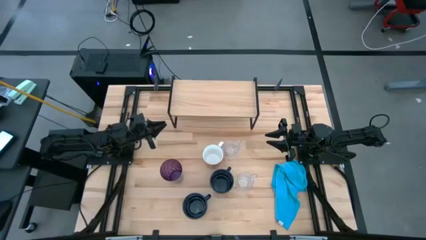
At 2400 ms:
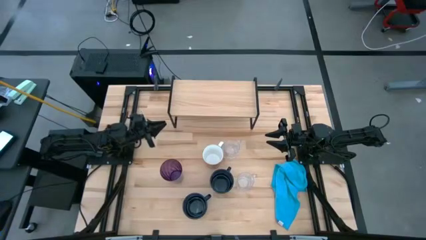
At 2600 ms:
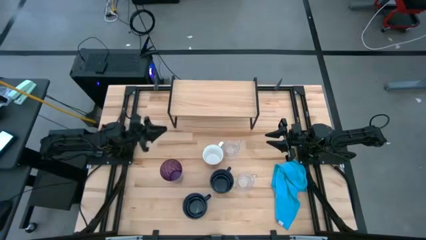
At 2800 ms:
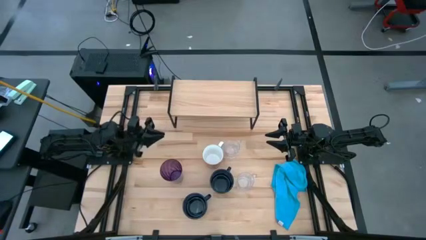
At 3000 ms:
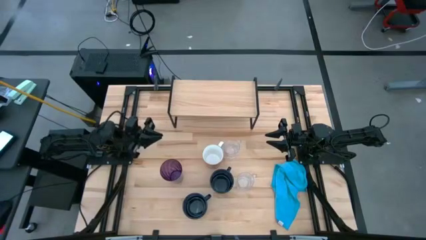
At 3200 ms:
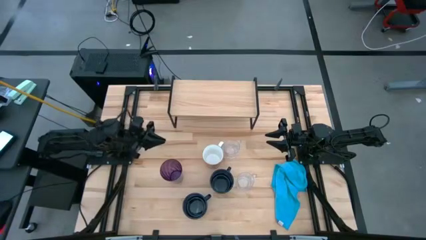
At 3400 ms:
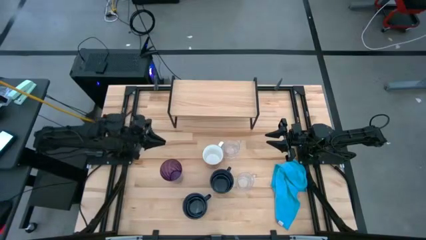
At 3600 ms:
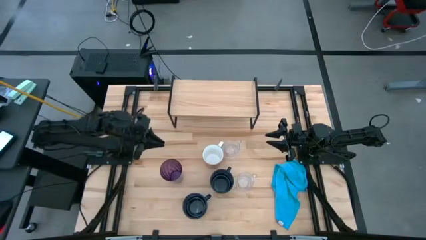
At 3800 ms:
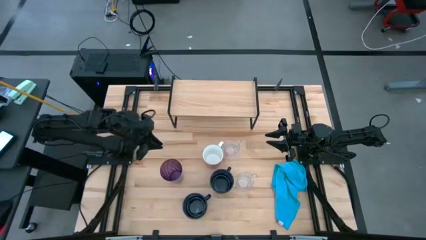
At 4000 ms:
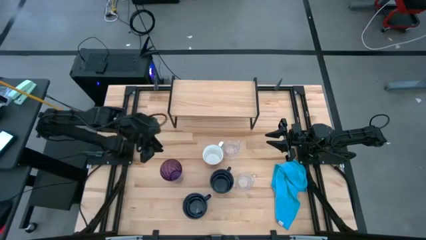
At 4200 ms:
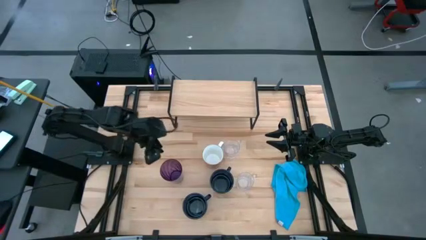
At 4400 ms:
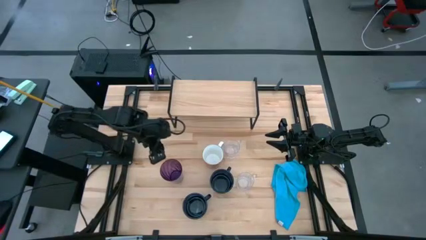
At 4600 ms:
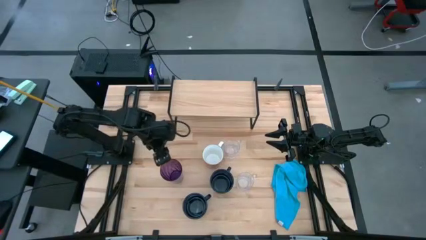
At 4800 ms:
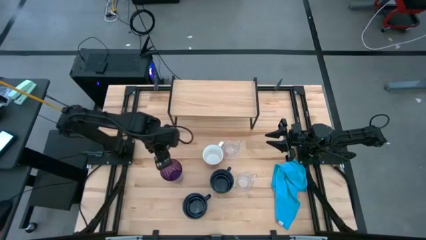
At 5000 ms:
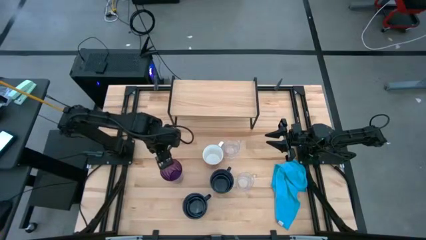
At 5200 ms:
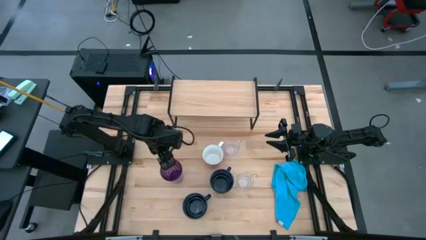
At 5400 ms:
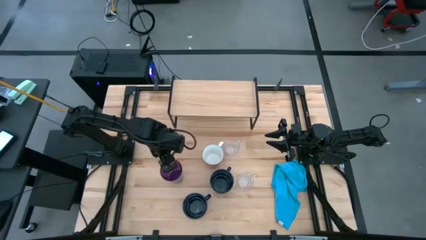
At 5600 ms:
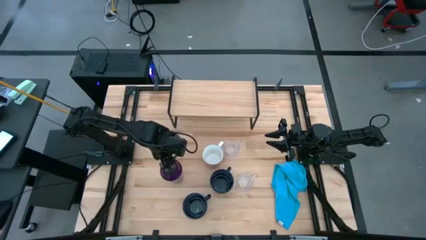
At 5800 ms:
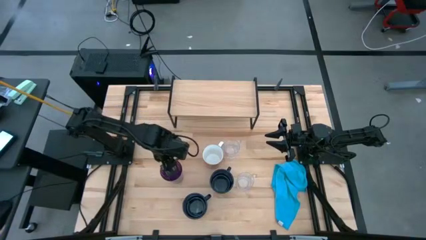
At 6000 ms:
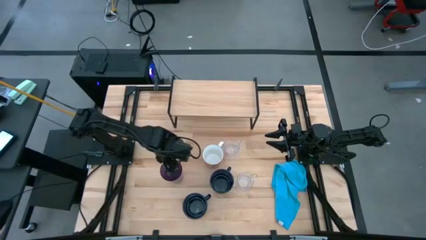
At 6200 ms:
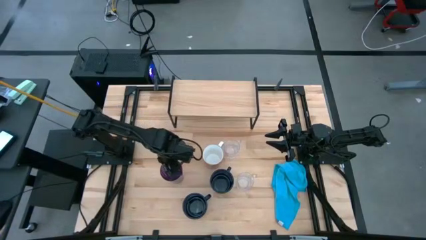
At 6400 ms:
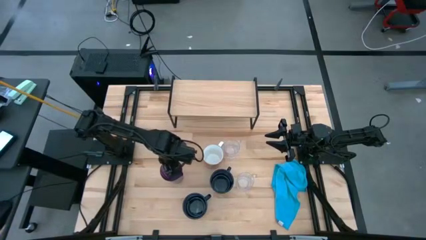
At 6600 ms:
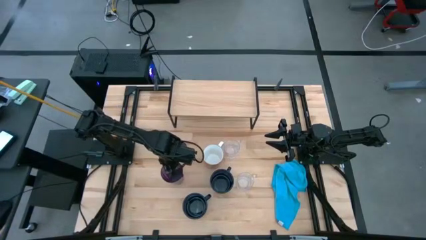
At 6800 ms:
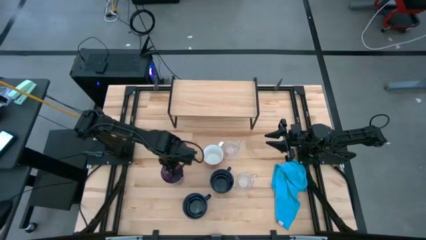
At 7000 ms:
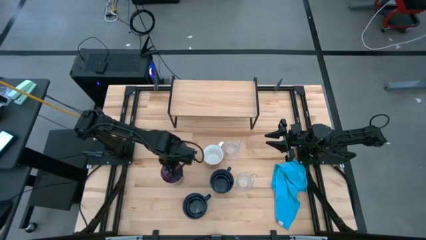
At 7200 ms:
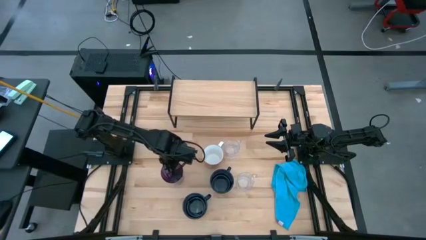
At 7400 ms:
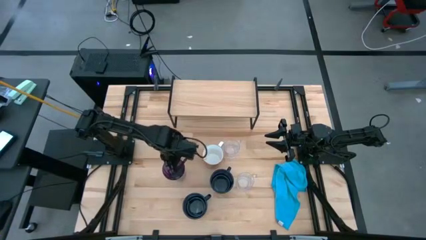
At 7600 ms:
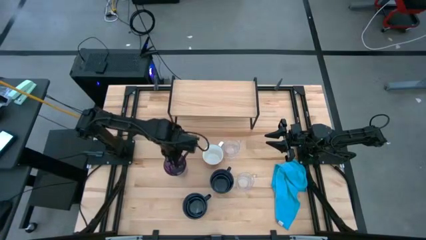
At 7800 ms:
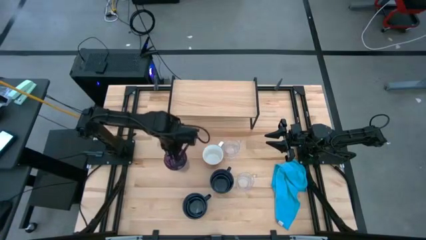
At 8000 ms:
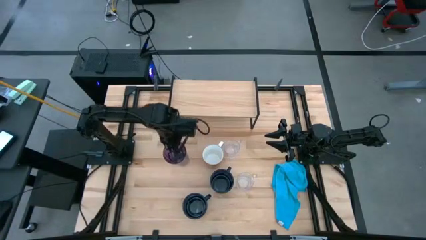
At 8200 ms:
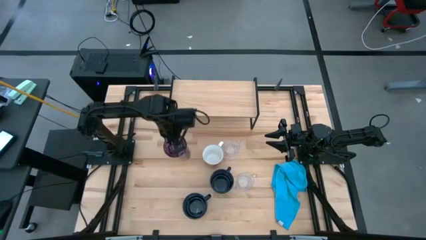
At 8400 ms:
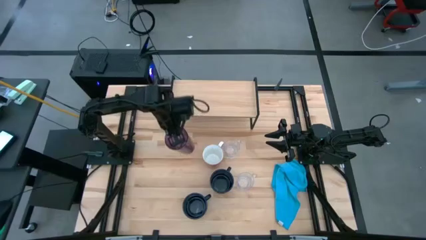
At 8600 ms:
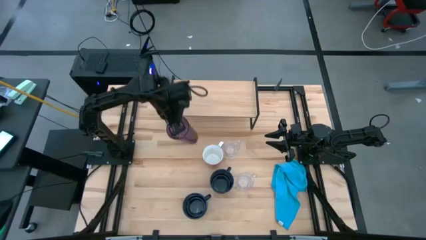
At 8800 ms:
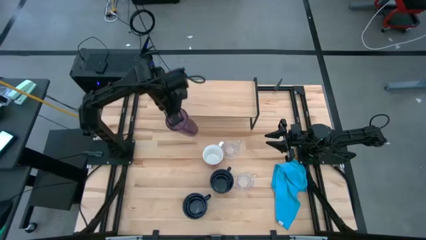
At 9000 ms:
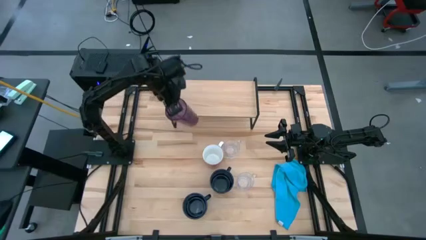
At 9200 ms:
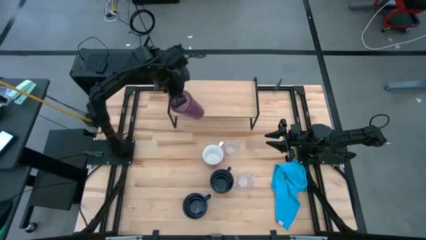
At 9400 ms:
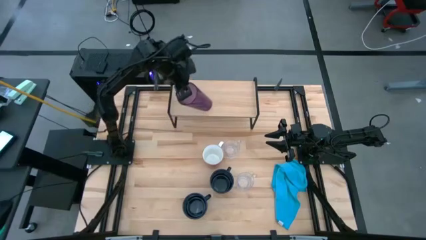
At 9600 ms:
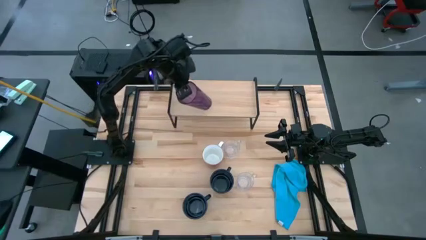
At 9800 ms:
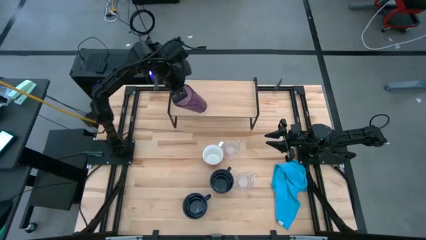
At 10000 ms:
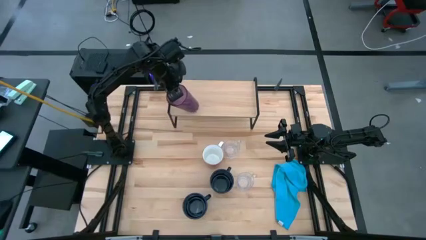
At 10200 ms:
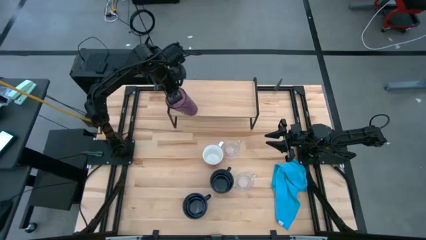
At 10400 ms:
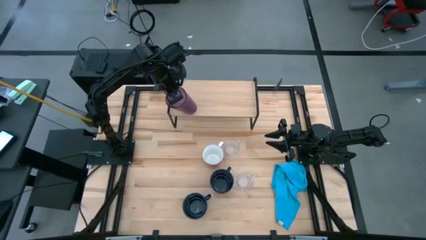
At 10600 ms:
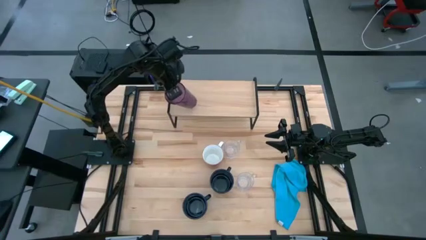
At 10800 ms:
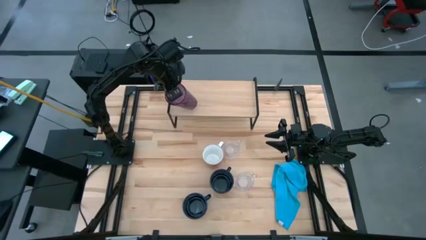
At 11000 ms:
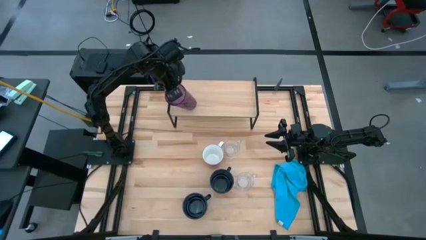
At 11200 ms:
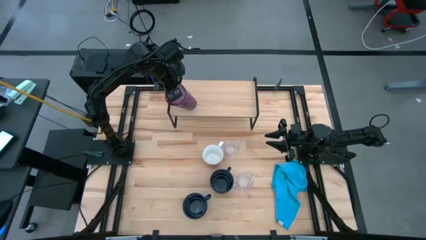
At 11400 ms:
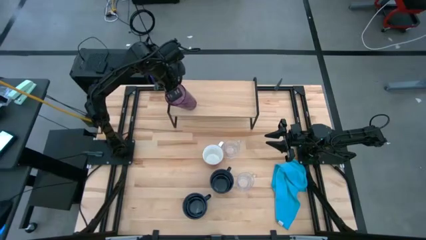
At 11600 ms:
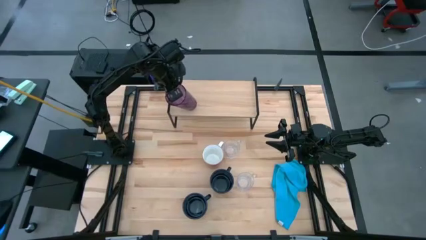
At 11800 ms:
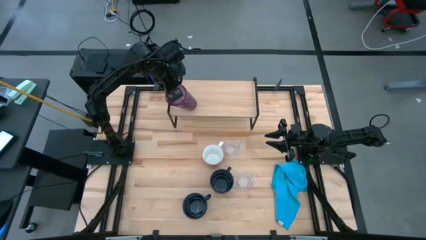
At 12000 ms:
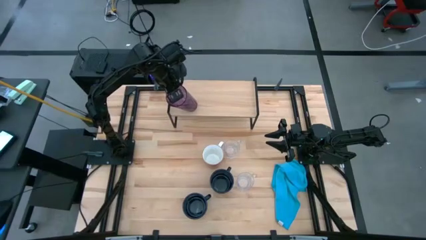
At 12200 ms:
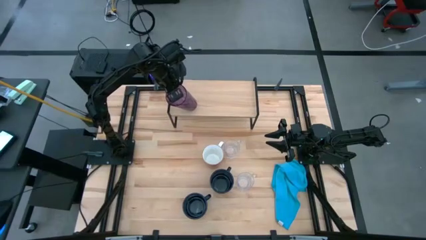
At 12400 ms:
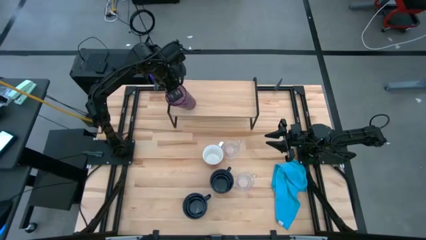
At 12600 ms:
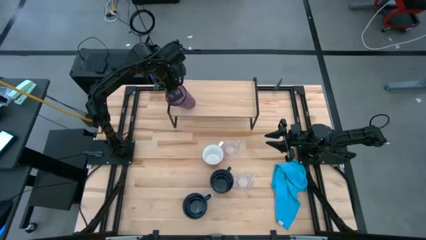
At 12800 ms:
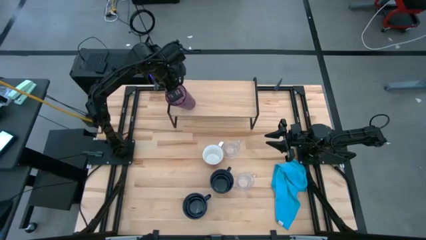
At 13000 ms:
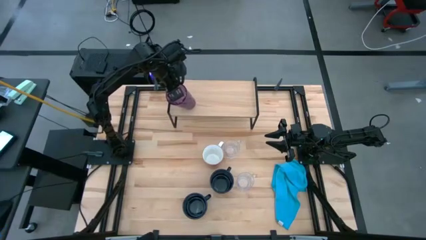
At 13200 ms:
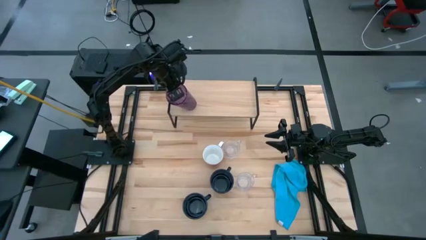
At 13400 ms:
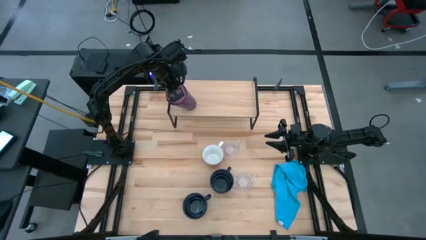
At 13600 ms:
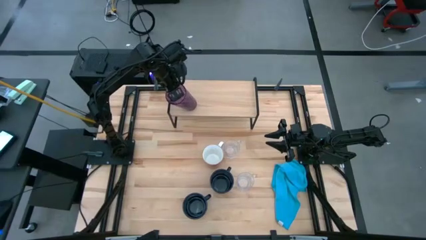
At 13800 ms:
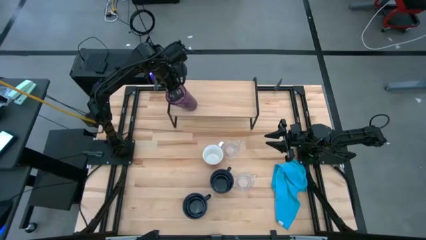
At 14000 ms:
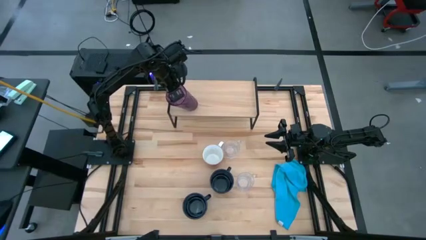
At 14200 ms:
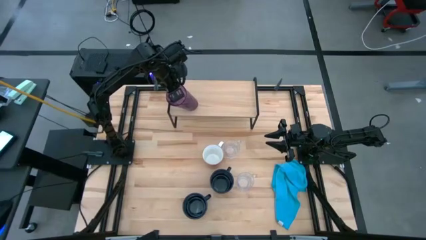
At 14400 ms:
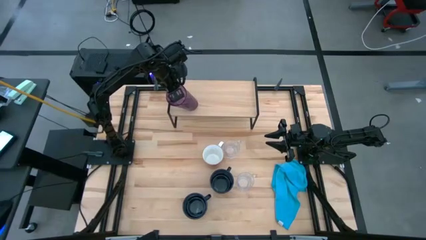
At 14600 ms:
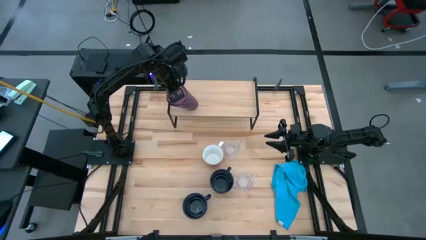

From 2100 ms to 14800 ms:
Task: Stack small to large cups/mugs on shelf
Put the violet cup on the shelf
